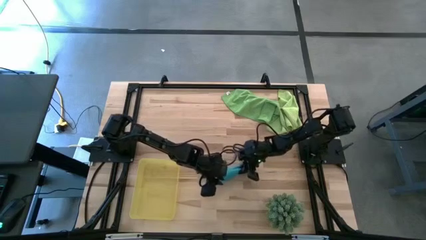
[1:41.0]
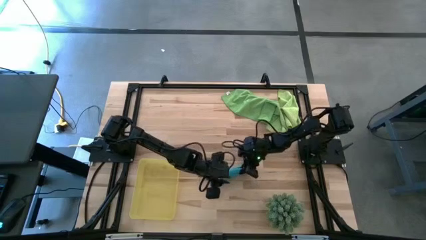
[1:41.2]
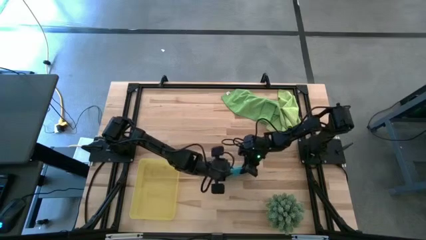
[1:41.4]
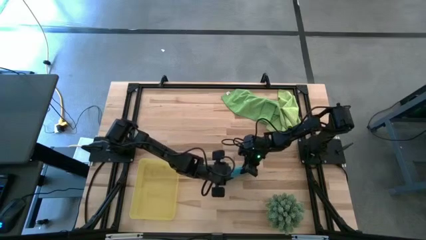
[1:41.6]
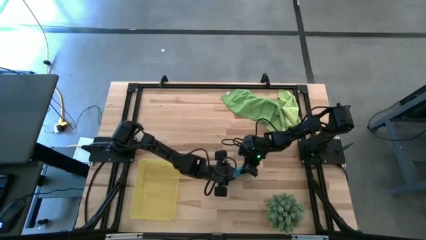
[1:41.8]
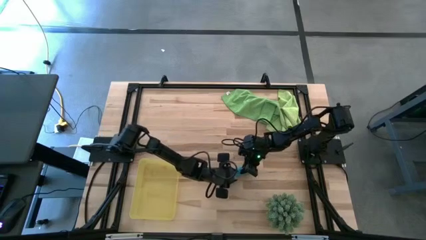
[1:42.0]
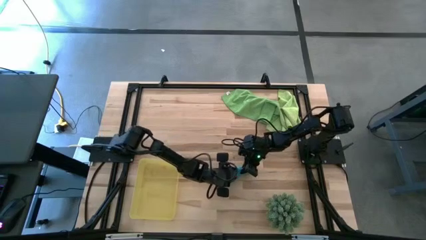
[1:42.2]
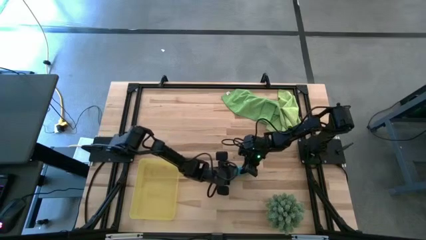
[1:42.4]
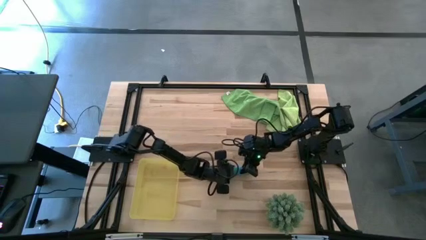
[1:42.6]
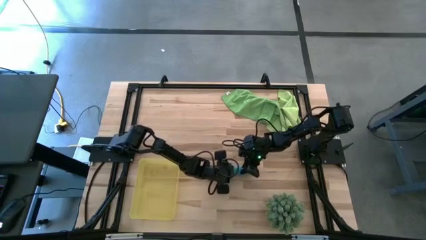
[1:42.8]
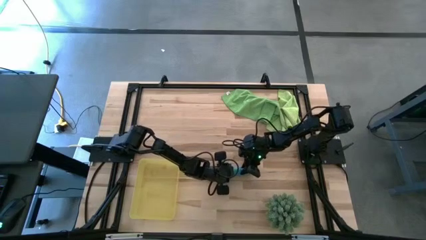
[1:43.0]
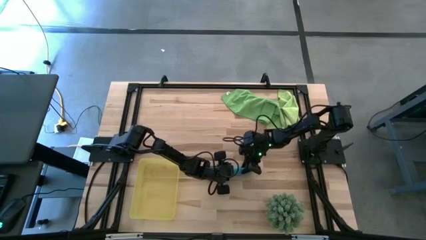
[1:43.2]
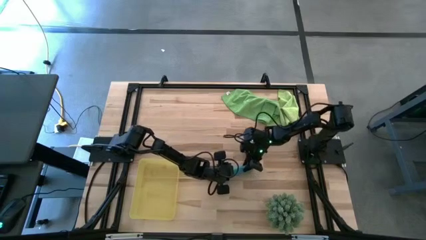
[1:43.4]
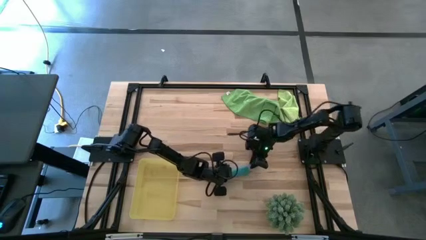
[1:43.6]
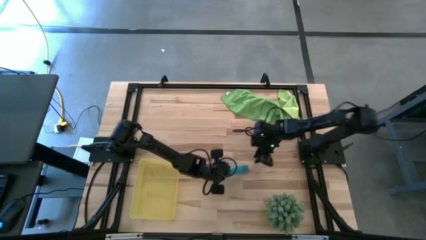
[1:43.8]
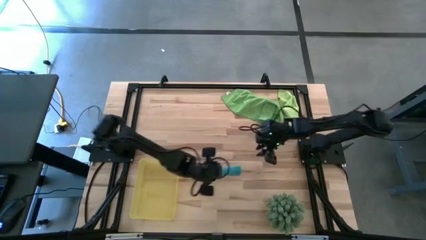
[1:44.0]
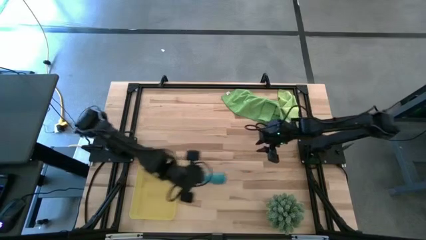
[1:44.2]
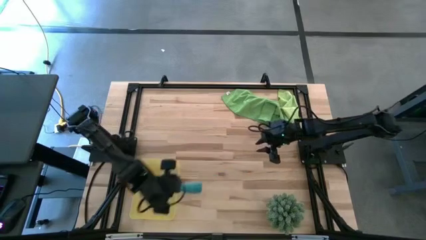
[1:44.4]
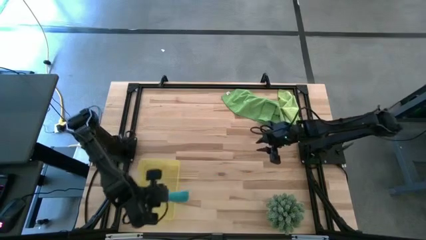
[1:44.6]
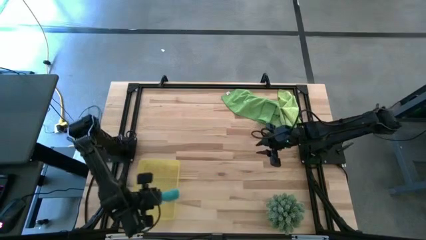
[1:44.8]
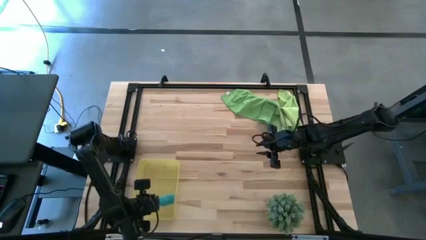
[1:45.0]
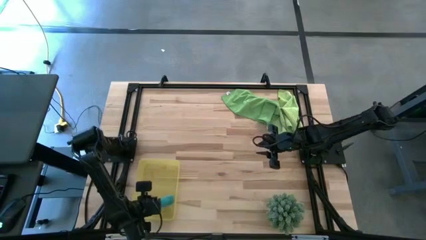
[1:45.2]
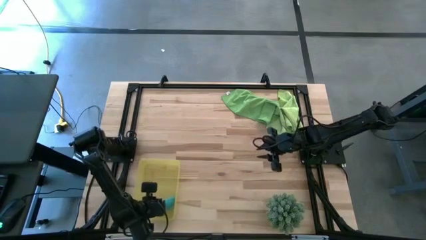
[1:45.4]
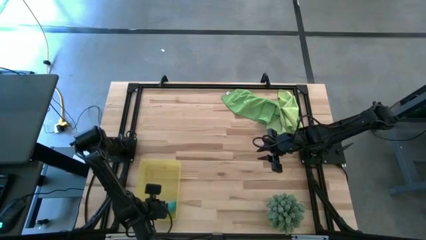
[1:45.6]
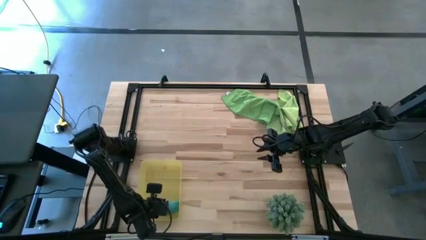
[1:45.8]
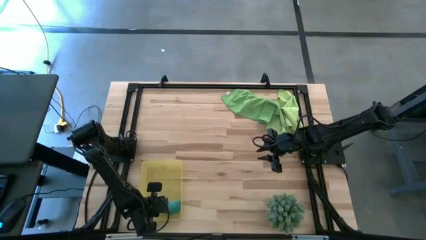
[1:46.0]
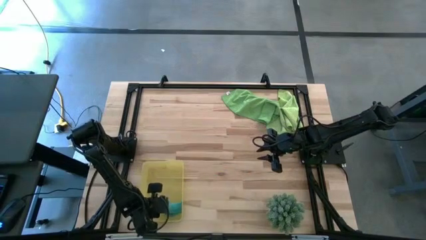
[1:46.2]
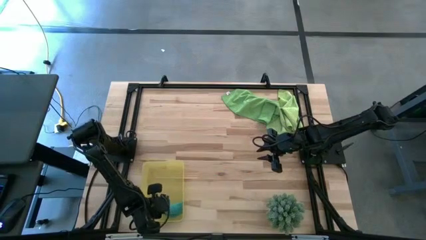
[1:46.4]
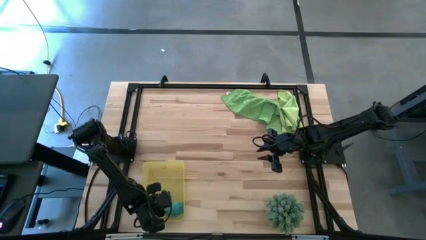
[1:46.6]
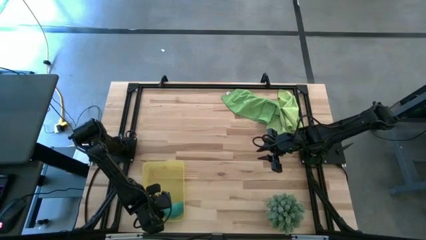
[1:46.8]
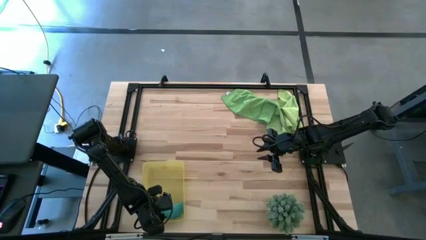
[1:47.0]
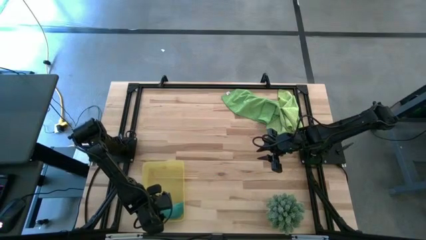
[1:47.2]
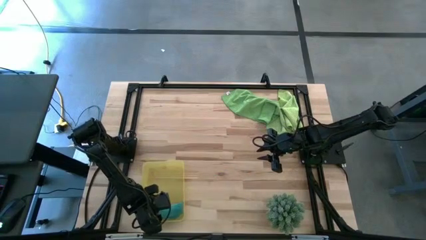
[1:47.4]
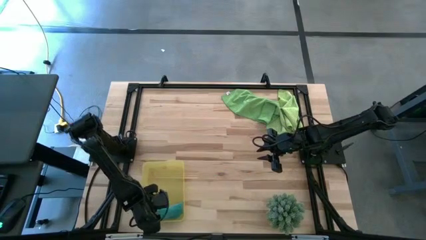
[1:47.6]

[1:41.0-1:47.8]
Task: Roll microfiber towels into tight, uniform cylinder then place into a basket
Put the blue microfiber towel into the yellow bin

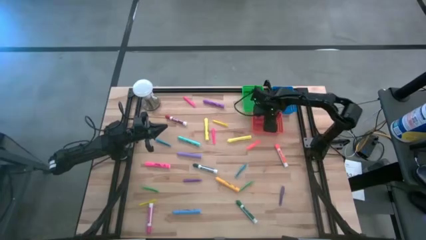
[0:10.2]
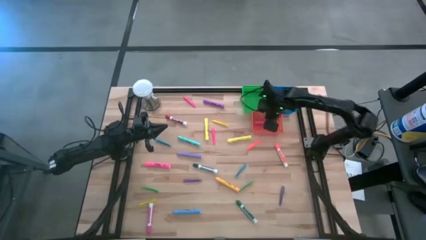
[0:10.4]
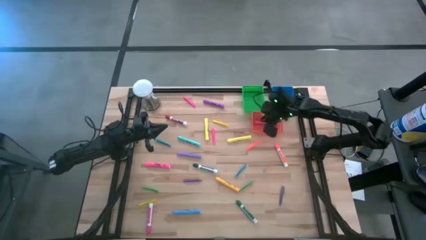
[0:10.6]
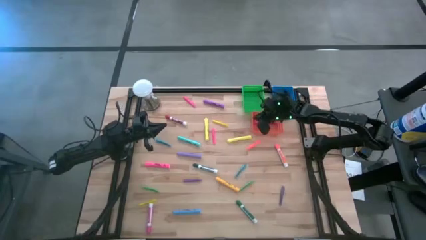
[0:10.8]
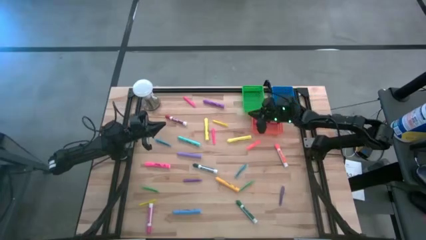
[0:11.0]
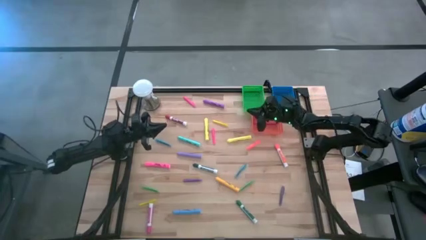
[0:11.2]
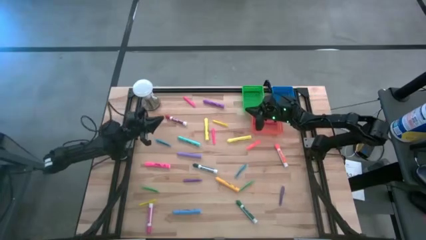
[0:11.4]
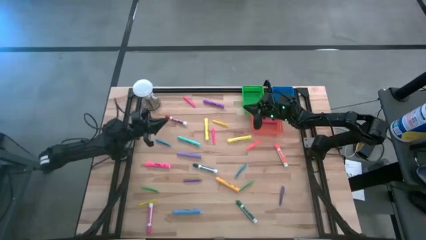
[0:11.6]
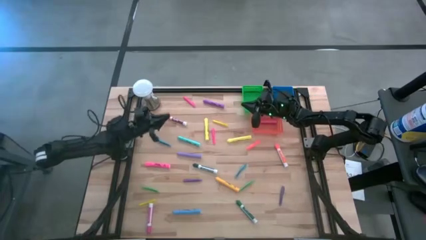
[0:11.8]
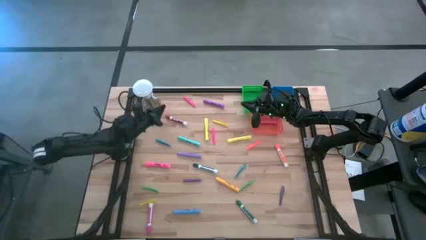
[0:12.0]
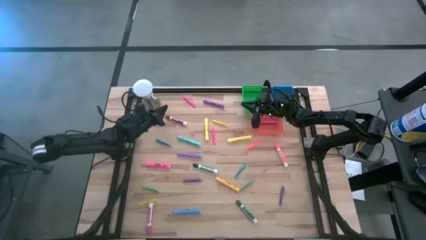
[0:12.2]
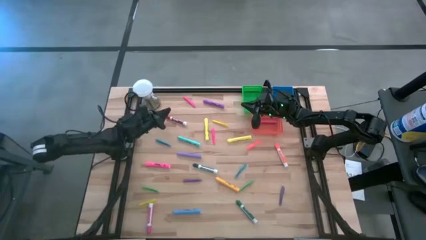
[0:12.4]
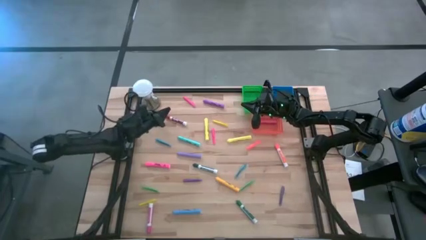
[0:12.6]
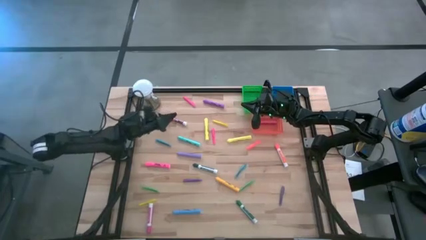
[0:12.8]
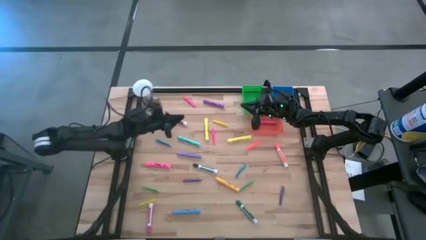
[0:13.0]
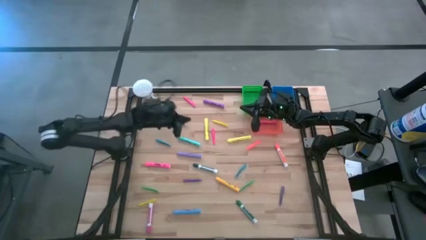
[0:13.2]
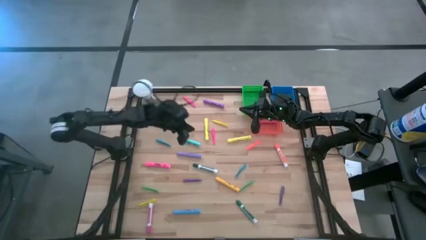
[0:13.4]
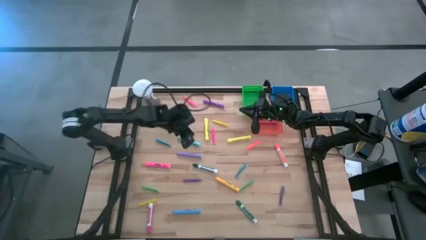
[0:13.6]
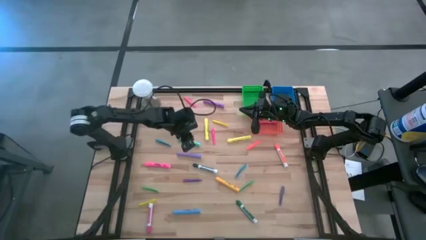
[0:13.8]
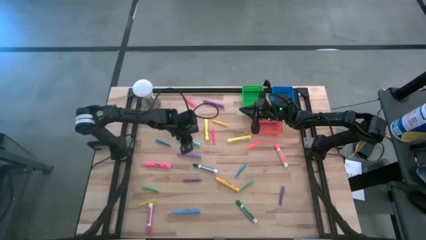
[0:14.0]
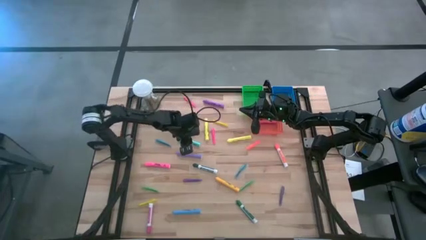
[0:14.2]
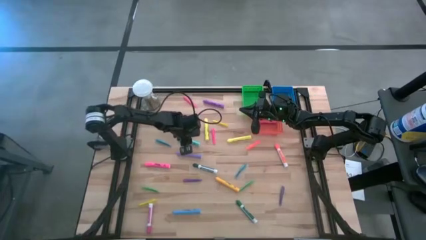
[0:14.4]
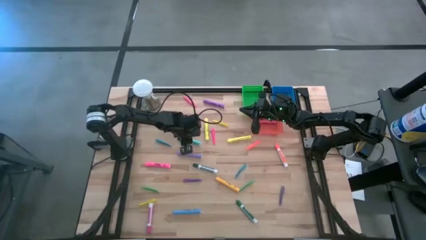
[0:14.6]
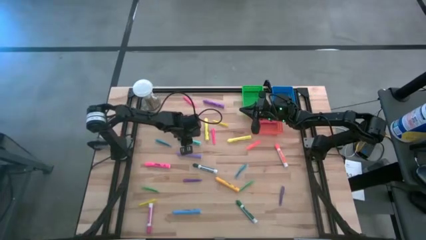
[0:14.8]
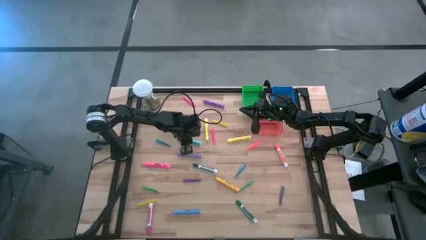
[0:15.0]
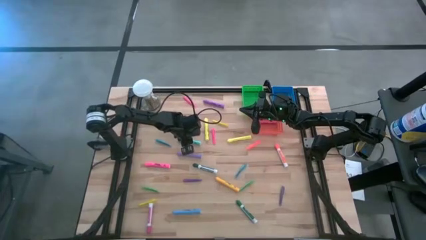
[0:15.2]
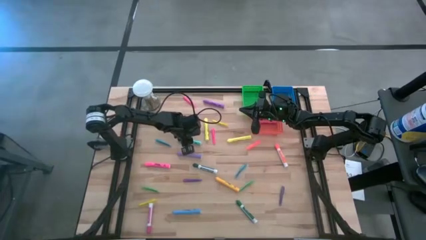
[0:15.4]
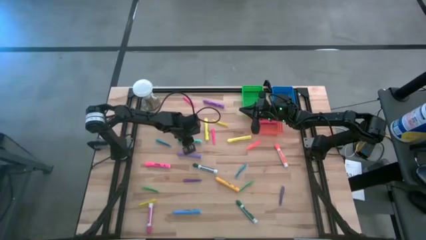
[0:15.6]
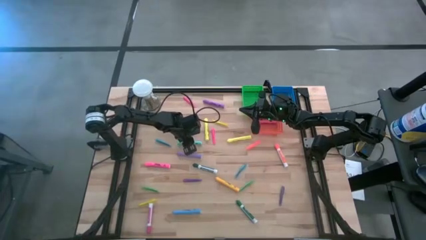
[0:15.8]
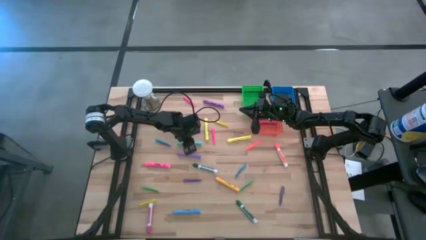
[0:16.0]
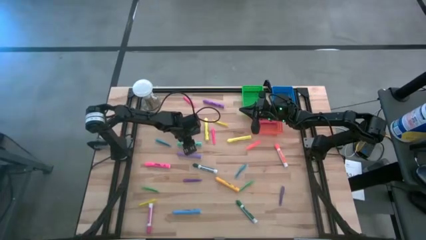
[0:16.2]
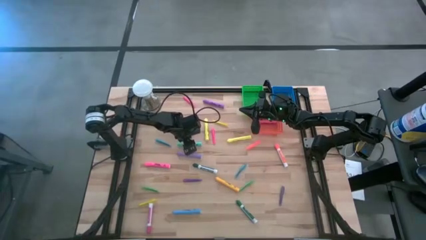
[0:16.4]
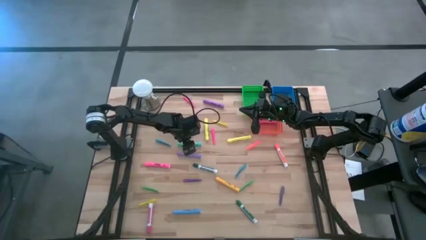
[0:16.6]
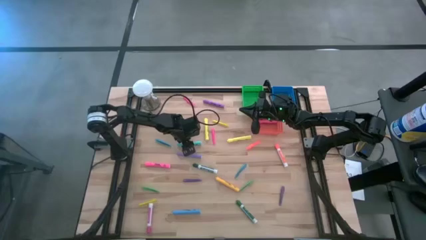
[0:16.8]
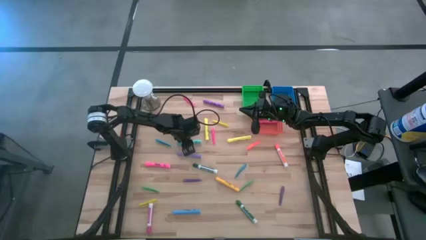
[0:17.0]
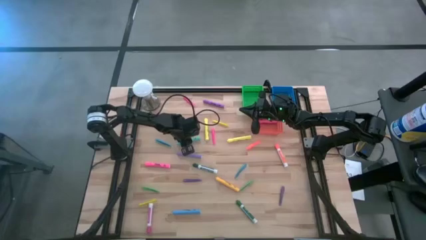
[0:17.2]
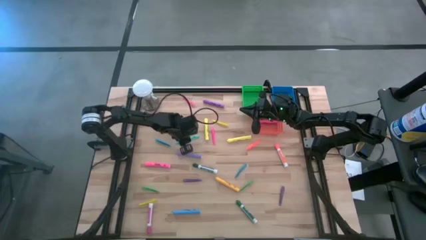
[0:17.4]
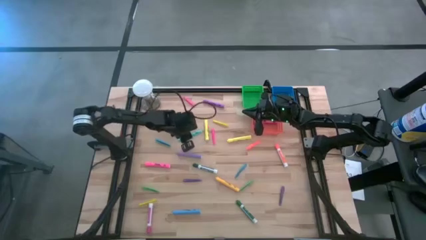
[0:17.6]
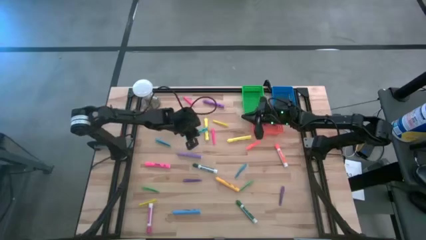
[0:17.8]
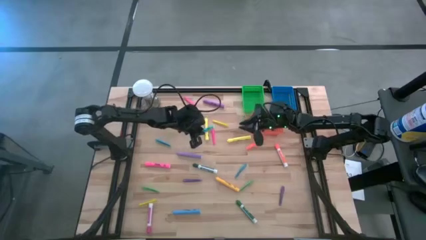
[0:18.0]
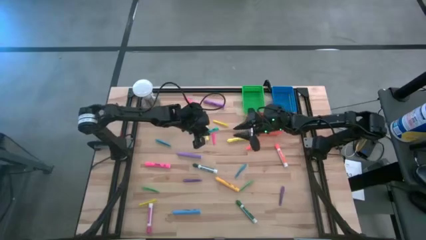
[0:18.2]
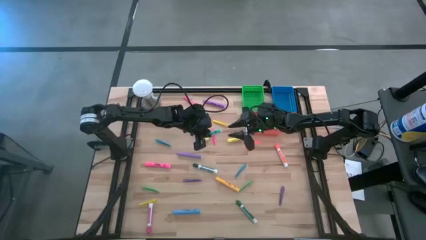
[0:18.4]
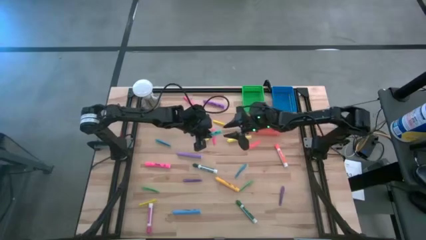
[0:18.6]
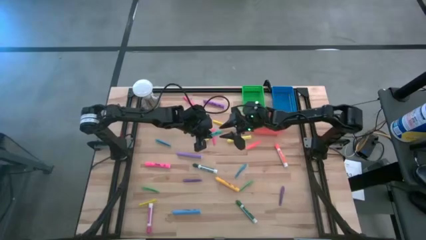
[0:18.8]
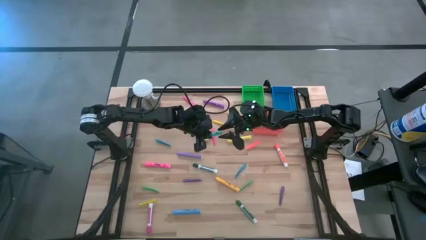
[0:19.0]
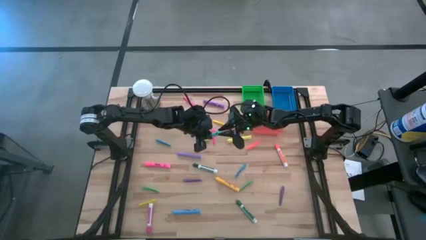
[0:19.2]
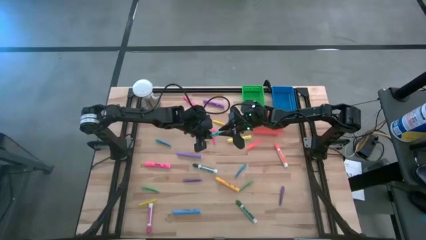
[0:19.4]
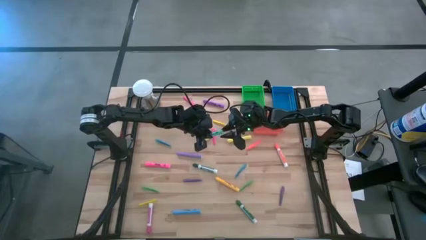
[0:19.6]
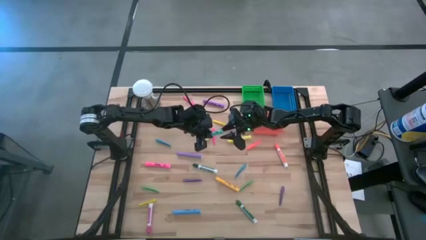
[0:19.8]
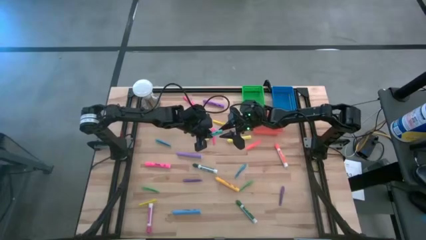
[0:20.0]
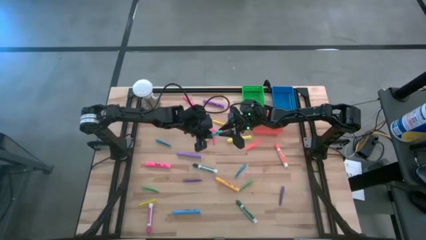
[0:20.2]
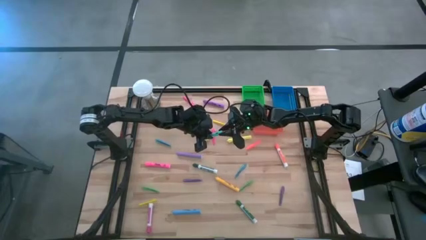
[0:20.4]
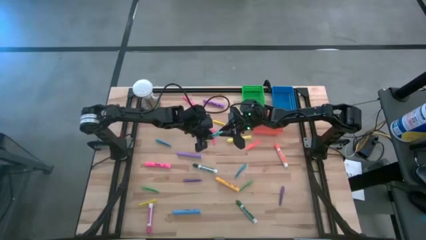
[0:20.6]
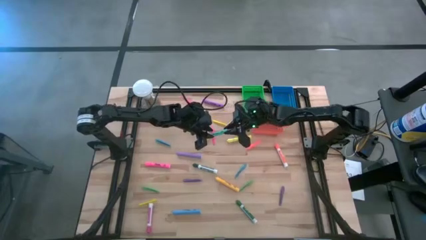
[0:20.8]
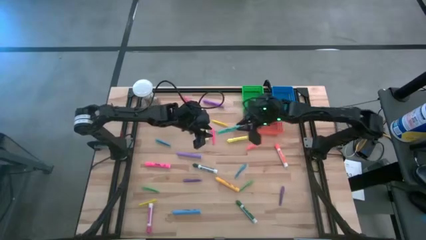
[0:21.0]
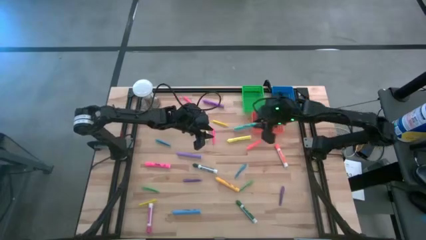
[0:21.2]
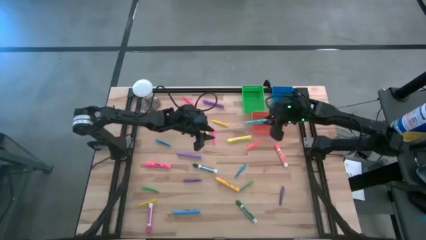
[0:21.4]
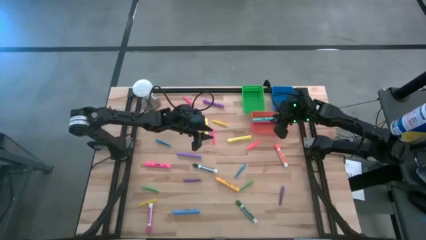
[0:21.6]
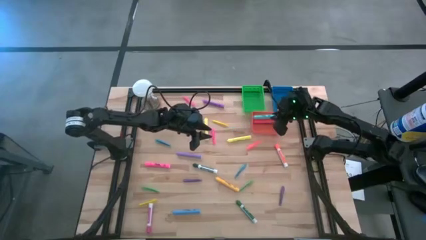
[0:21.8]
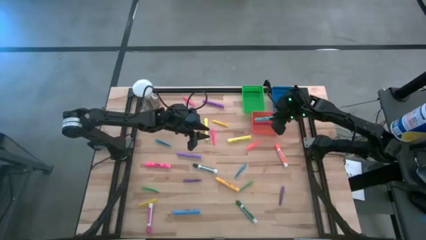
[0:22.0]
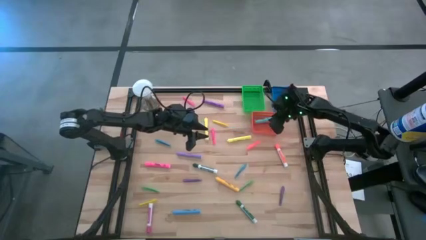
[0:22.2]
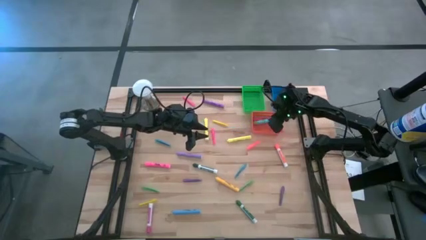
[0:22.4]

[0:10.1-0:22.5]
Task: Pick & Place Markers
Put the light blue highlighter pen into the orange bin
